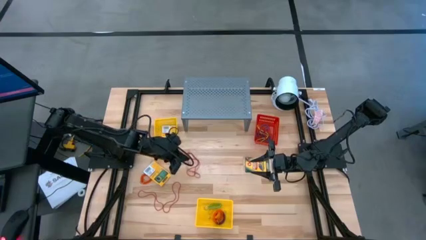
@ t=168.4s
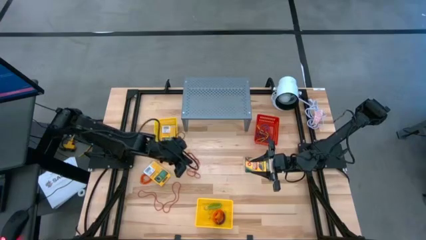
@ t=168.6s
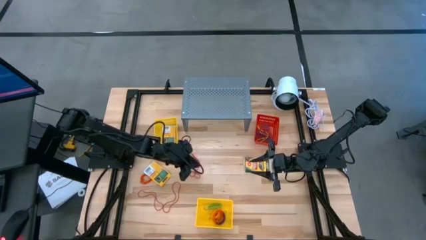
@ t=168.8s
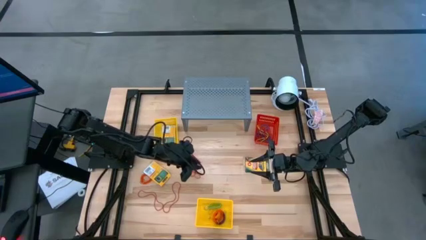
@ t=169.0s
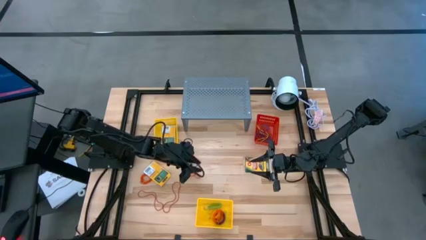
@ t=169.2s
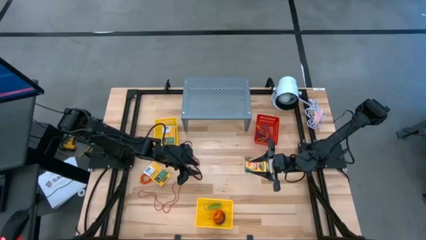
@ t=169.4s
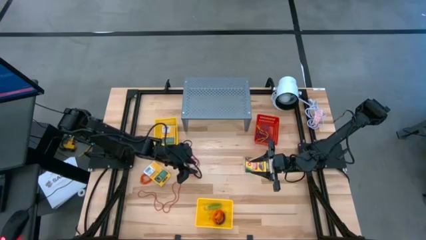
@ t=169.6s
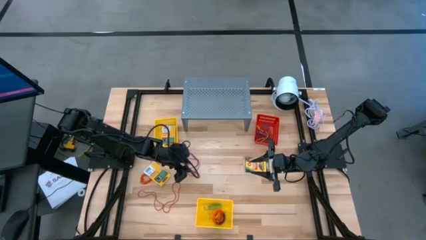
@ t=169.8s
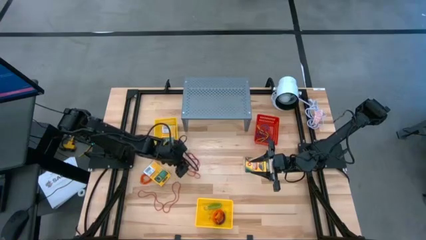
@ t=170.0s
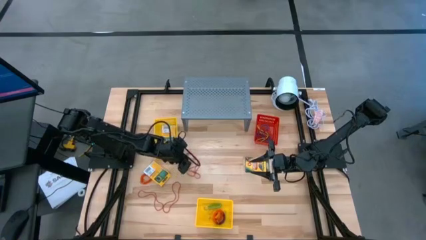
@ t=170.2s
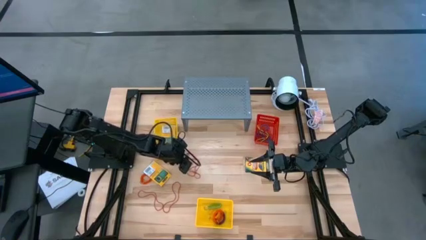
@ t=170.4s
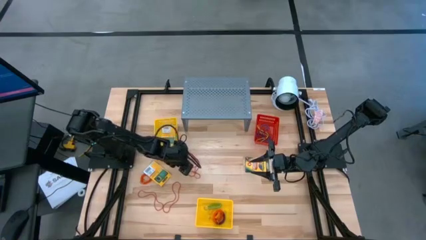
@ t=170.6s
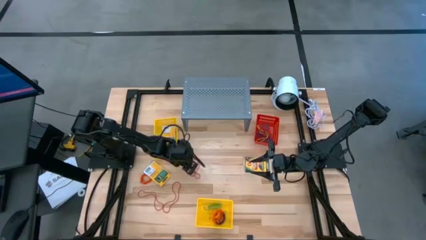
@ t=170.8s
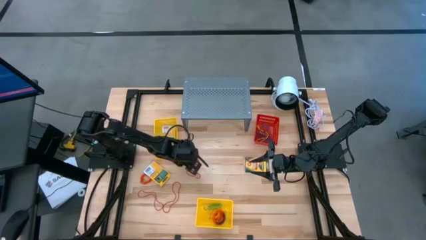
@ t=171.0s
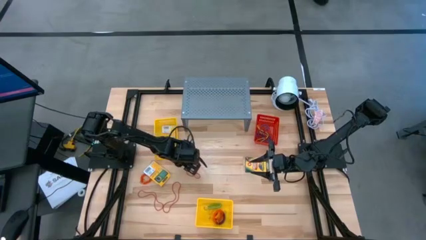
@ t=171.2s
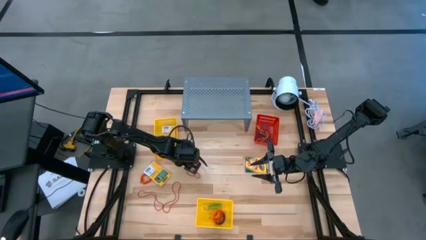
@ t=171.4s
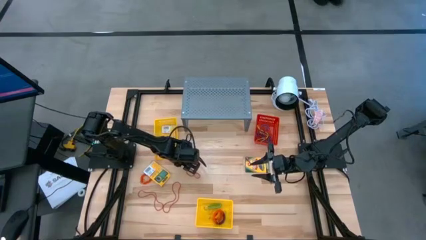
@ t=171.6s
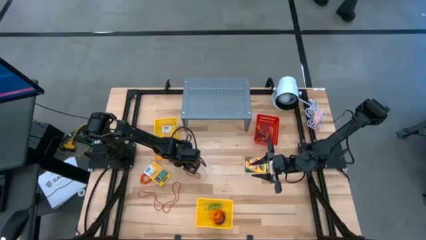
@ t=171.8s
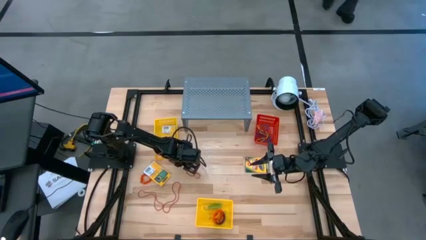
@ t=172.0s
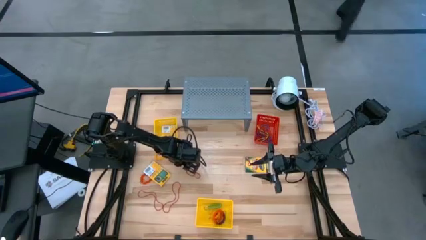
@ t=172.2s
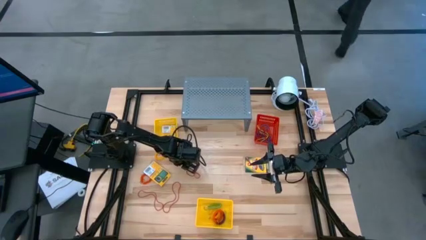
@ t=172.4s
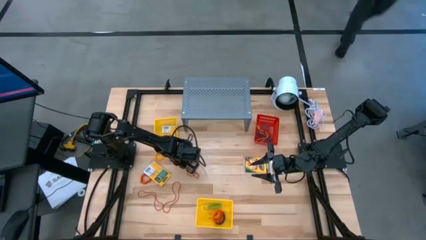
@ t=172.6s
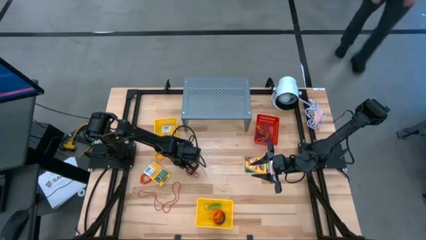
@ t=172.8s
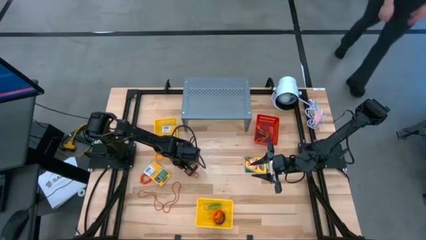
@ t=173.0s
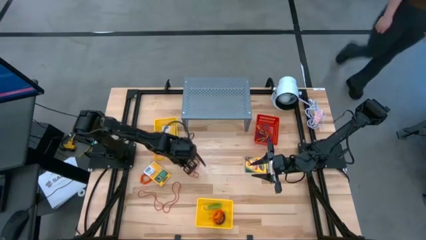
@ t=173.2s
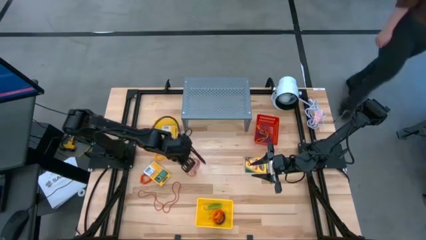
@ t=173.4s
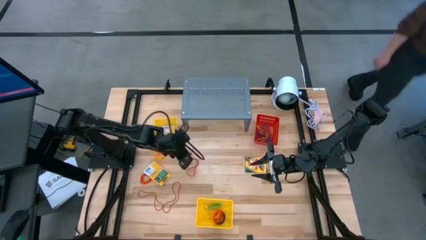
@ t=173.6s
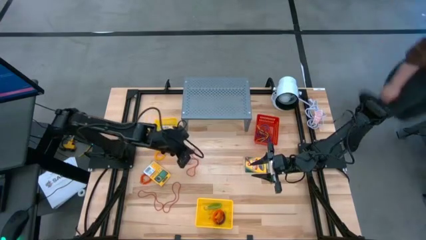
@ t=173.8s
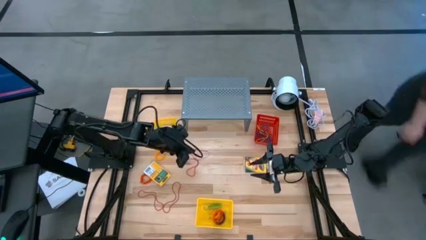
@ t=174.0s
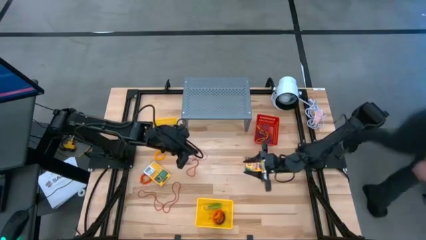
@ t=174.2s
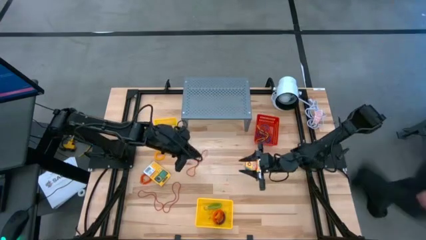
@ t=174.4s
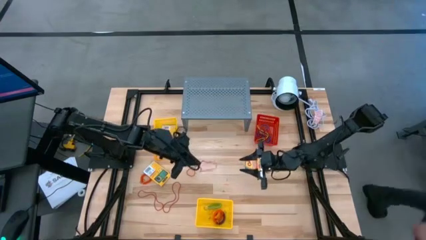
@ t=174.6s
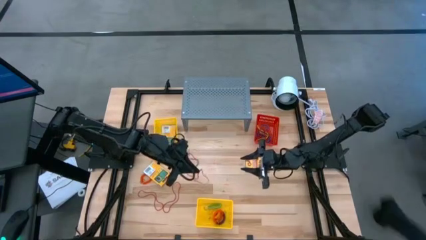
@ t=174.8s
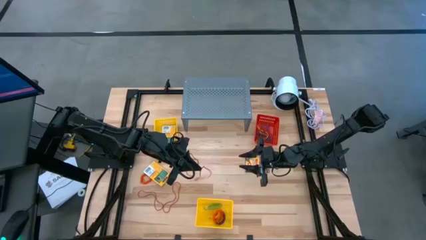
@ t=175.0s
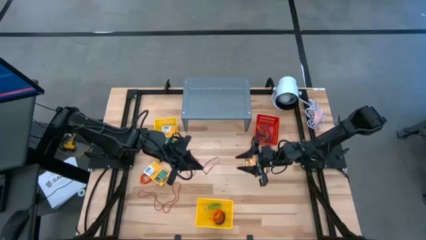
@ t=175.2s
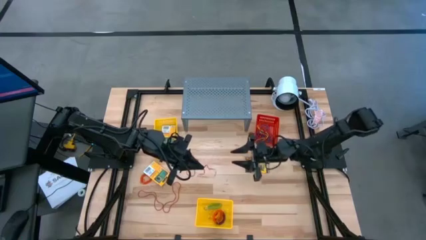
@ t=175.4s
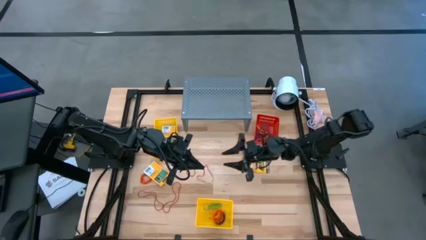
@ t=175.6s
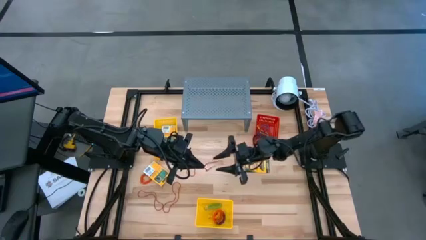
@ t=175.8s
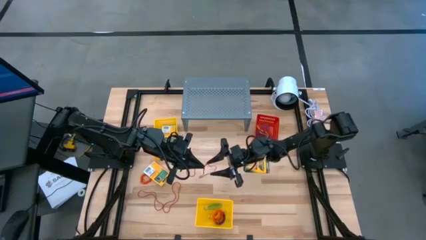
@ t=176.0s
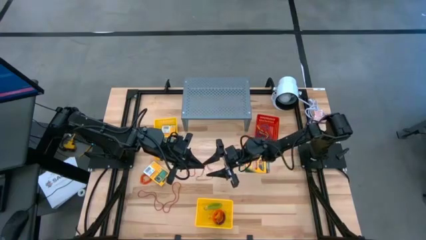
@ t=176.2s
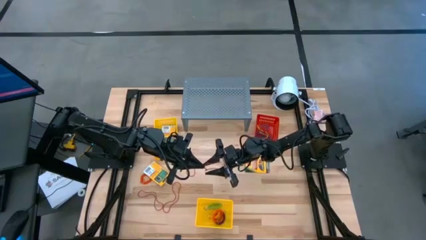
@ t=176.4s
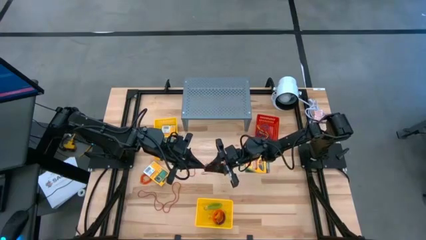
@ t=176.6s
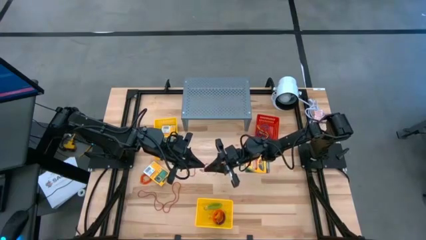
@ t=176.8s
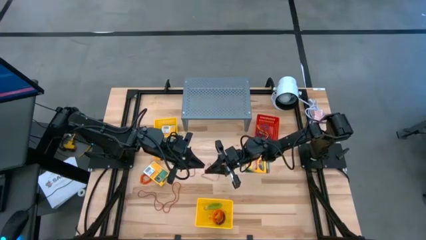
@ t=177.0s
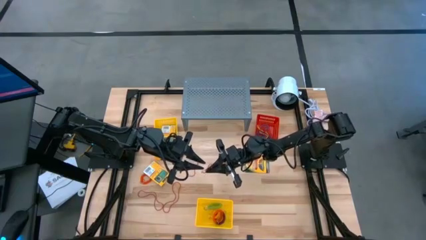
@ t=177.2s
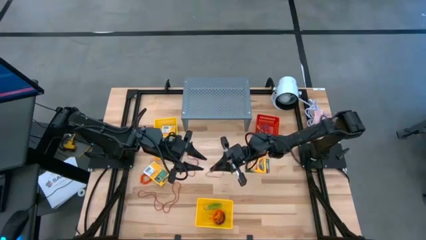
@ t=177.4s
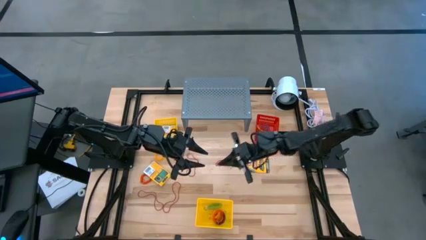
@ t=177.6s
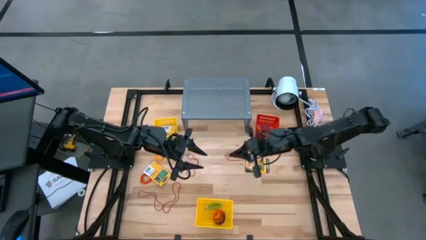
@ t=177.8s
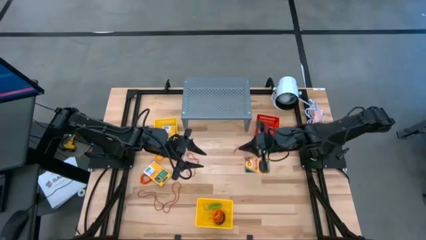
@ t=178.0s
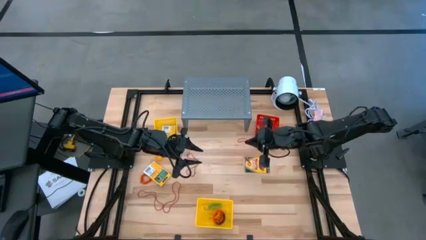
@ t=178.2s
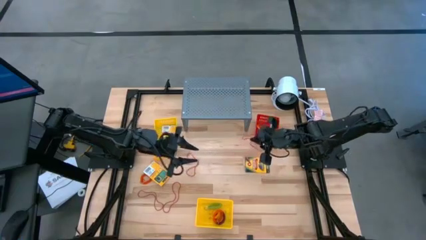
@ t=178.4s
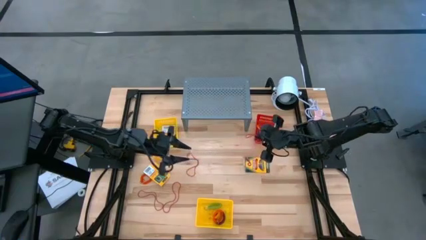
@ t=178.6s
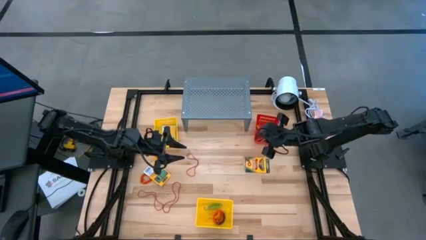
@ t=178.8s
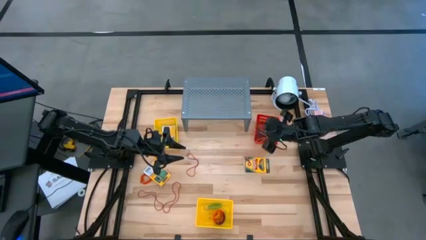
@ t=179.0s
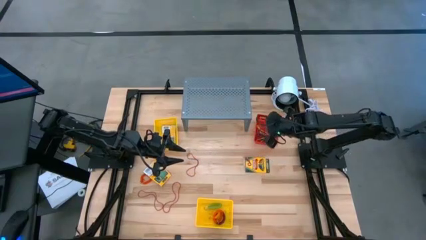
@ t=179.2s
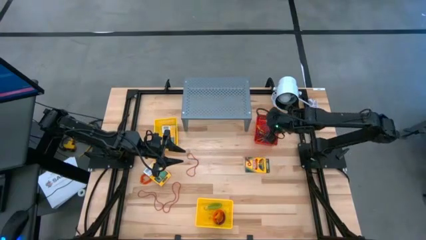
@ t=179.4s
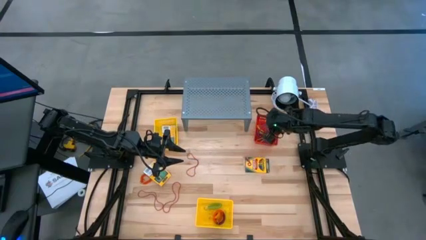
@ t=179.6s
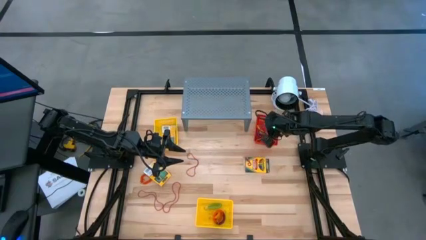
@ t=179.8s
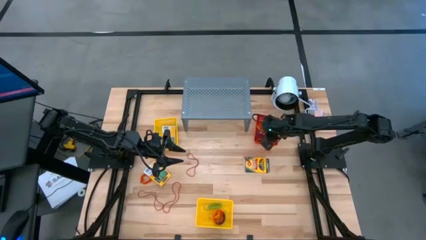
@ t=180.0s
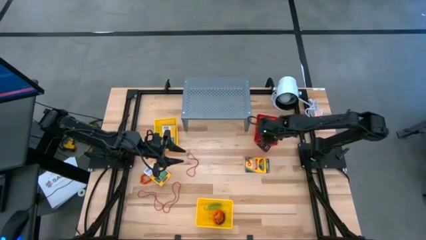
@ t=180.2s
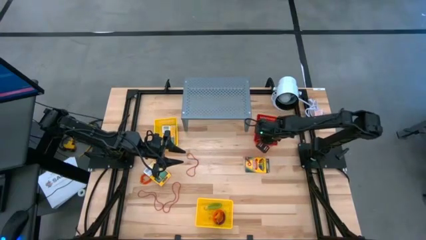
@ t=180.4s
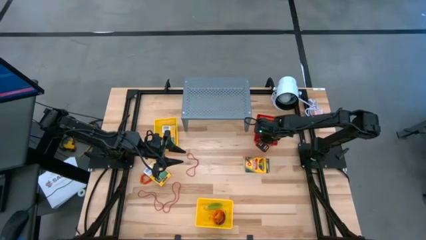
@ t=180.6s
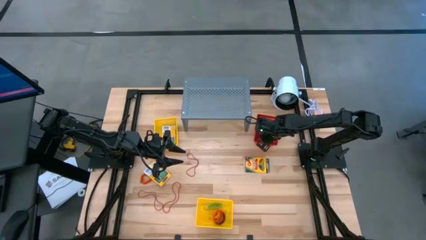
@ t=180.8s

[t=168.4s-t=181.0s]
Task: Pick & Place Office Desk Supplies
Put the red rubber band into the red bin
